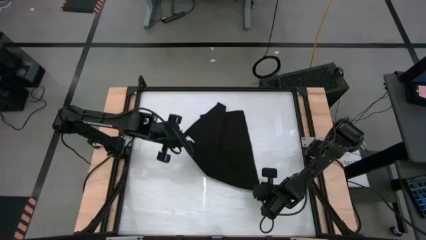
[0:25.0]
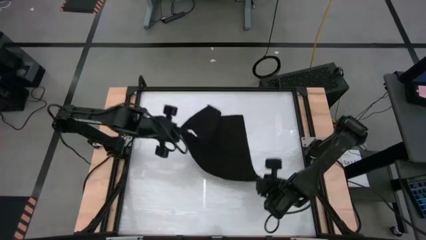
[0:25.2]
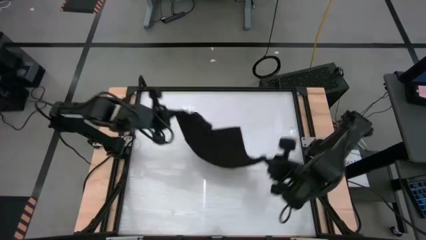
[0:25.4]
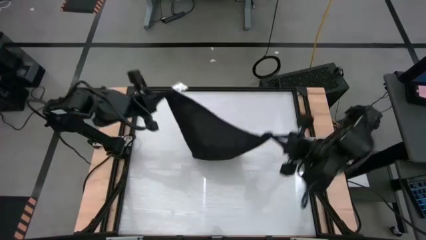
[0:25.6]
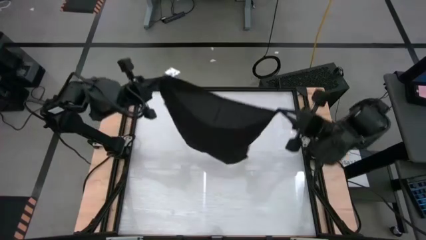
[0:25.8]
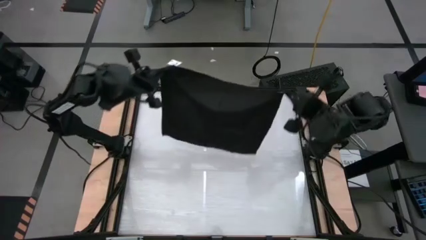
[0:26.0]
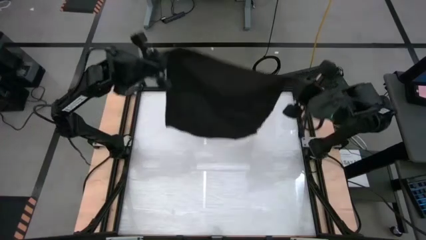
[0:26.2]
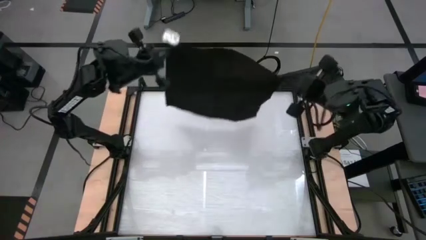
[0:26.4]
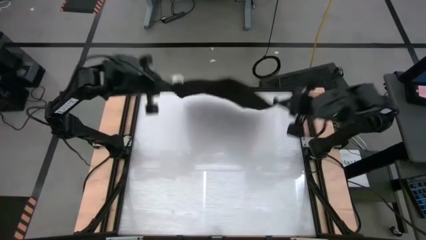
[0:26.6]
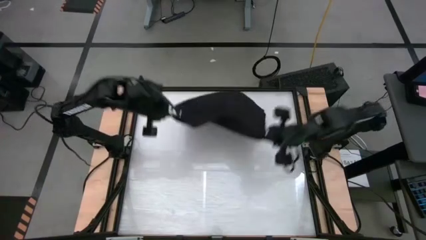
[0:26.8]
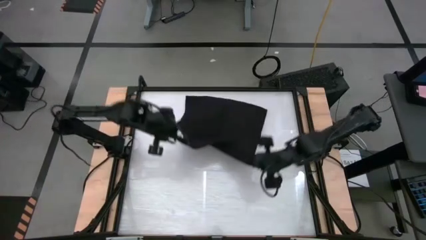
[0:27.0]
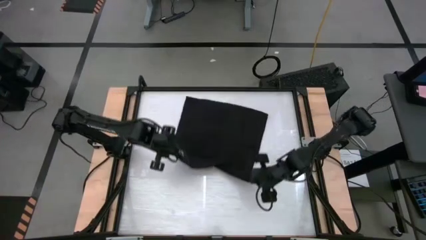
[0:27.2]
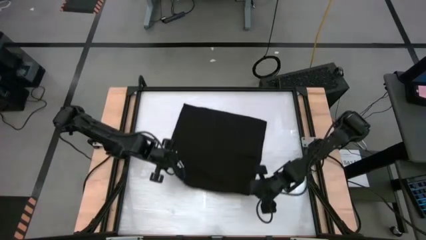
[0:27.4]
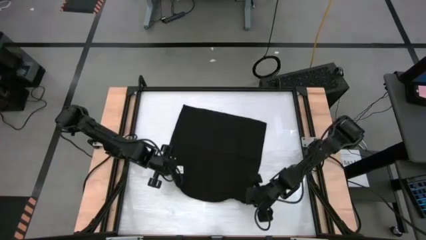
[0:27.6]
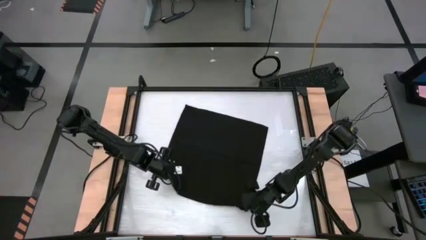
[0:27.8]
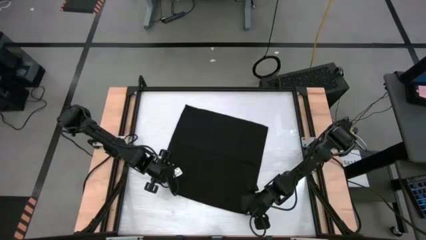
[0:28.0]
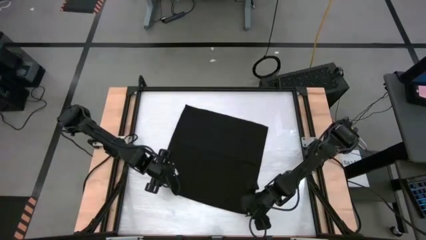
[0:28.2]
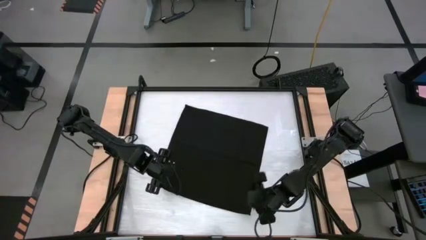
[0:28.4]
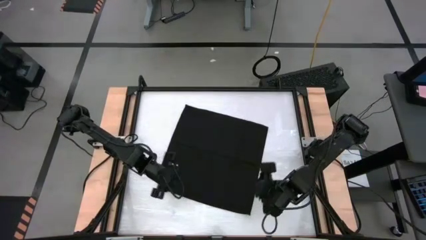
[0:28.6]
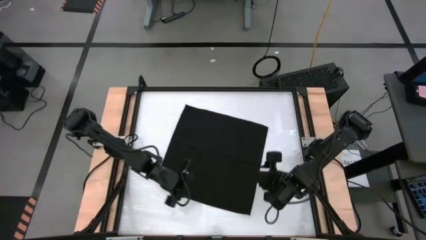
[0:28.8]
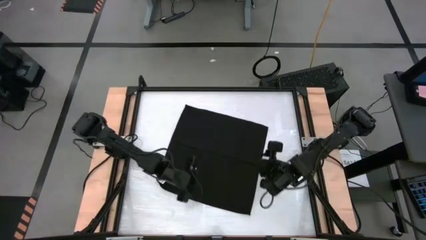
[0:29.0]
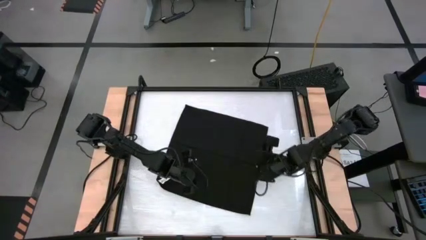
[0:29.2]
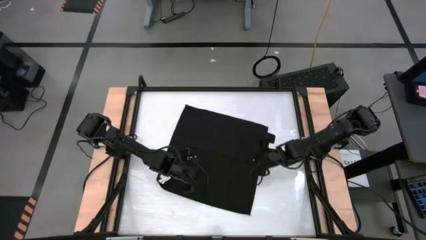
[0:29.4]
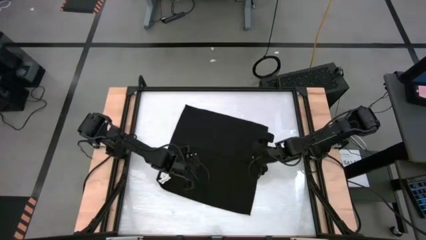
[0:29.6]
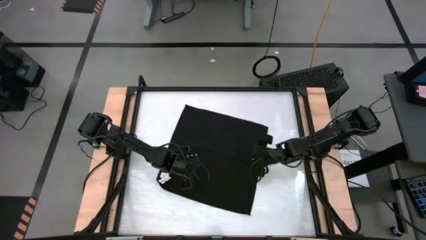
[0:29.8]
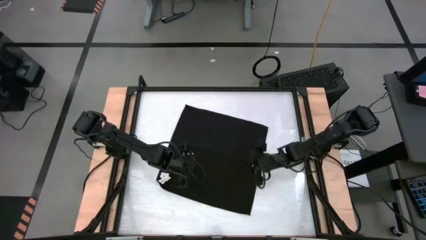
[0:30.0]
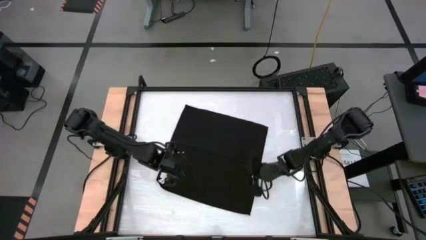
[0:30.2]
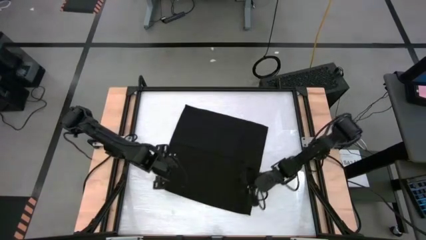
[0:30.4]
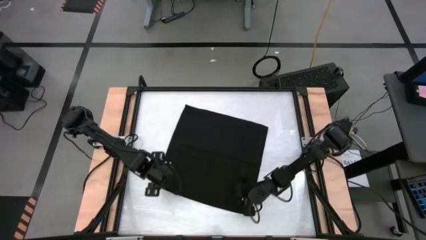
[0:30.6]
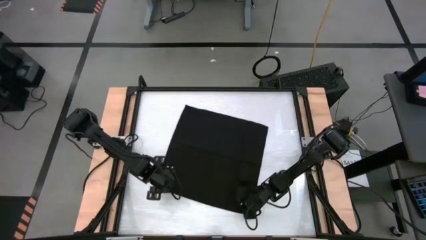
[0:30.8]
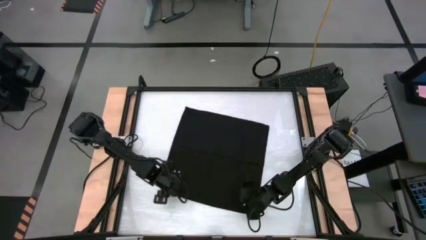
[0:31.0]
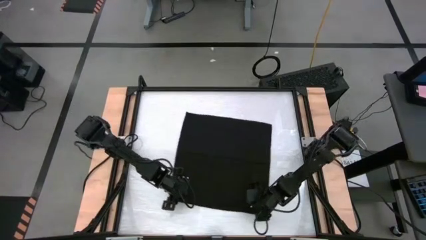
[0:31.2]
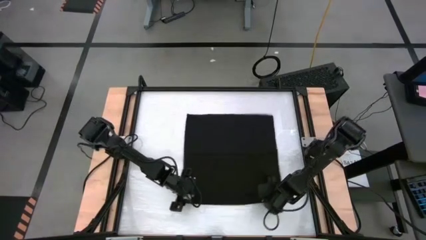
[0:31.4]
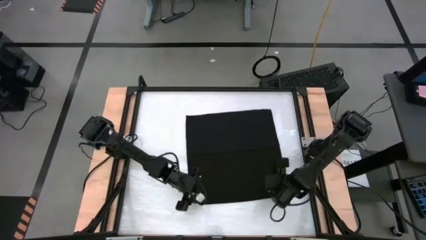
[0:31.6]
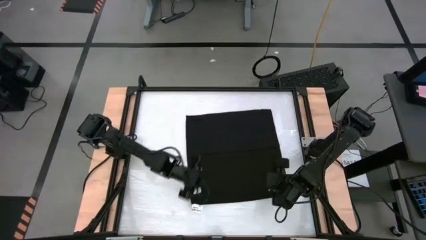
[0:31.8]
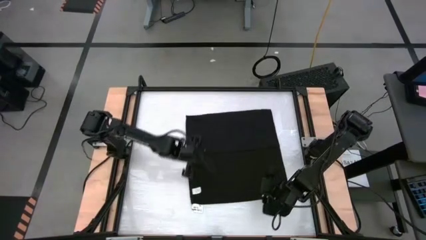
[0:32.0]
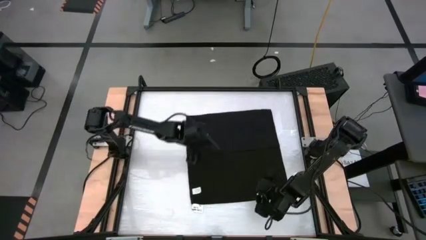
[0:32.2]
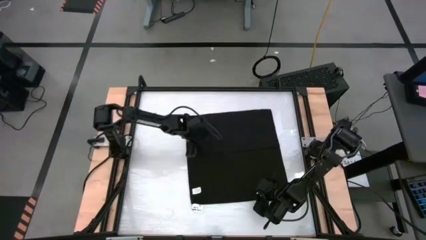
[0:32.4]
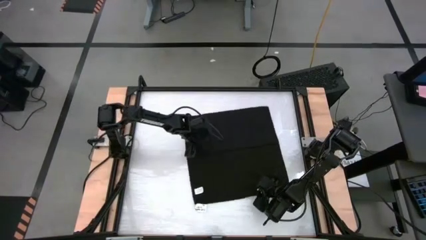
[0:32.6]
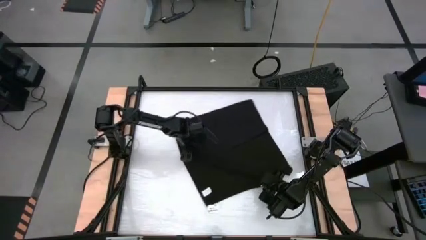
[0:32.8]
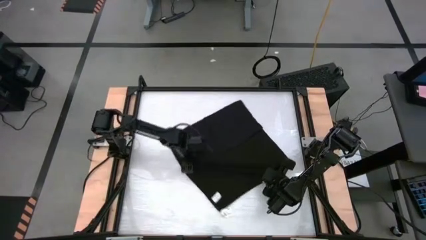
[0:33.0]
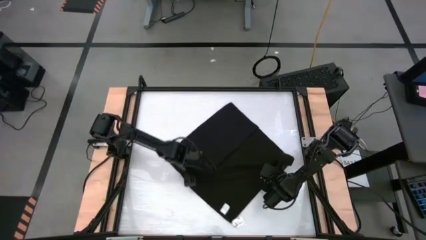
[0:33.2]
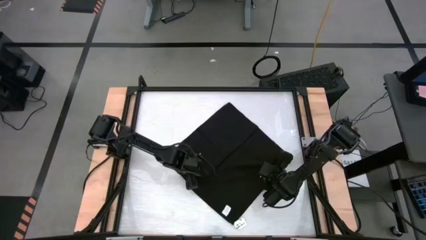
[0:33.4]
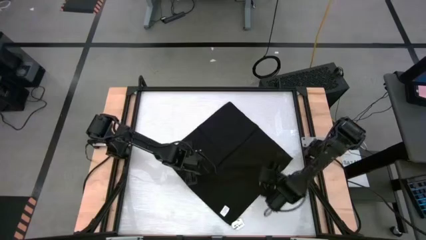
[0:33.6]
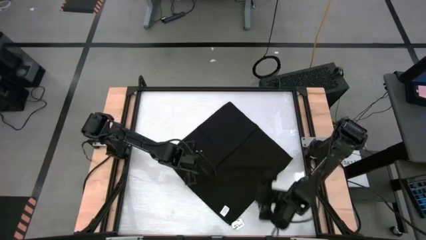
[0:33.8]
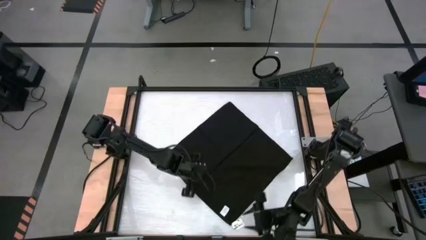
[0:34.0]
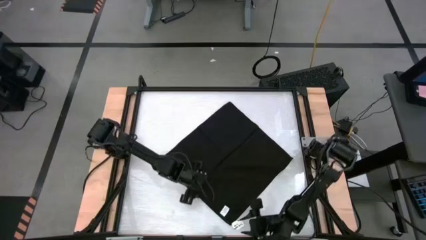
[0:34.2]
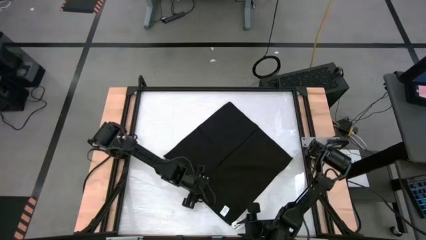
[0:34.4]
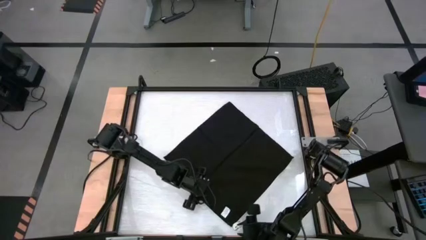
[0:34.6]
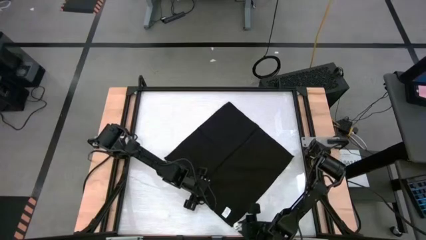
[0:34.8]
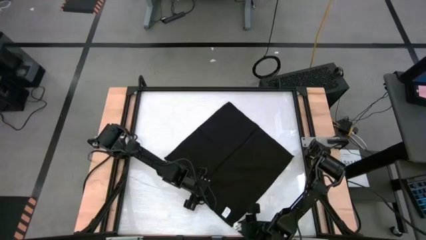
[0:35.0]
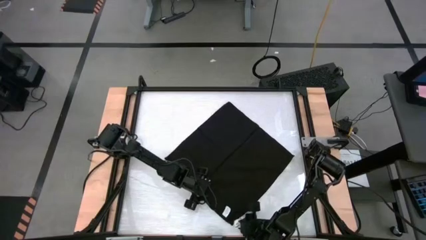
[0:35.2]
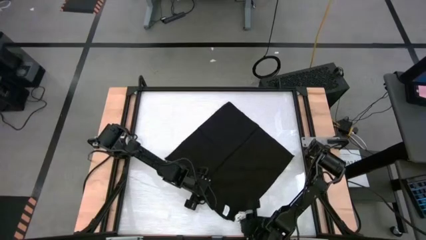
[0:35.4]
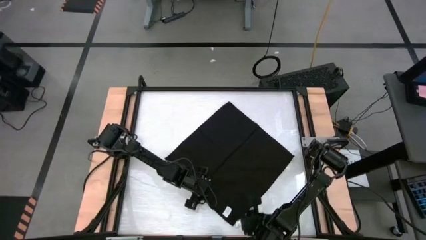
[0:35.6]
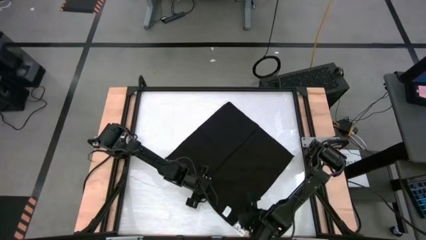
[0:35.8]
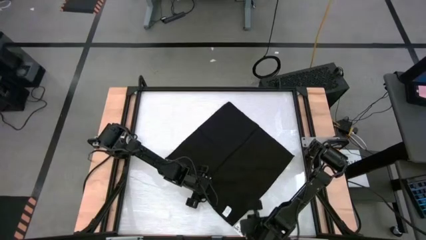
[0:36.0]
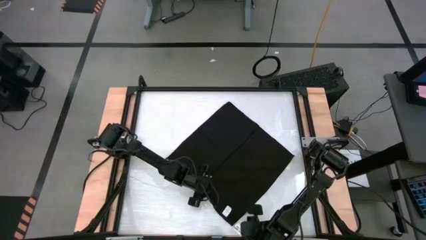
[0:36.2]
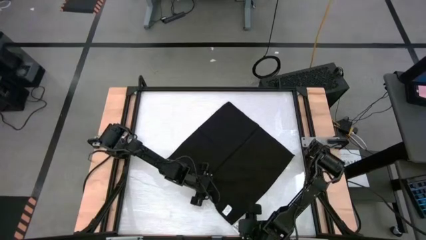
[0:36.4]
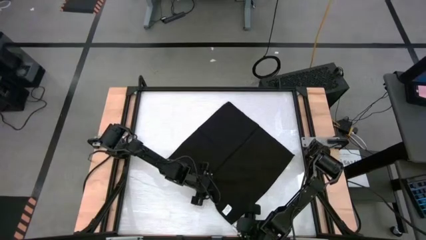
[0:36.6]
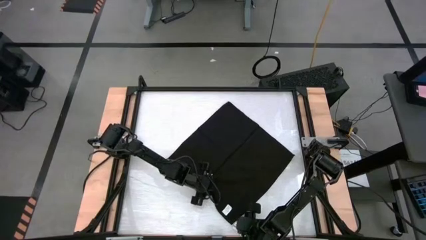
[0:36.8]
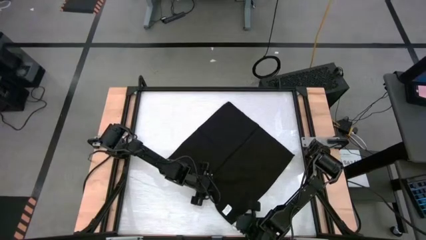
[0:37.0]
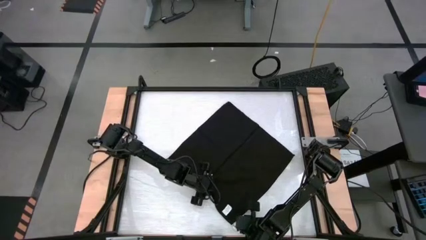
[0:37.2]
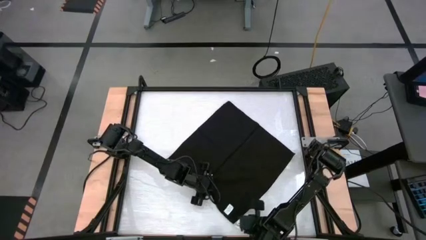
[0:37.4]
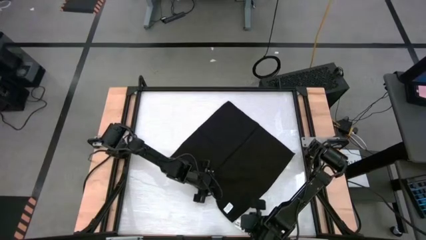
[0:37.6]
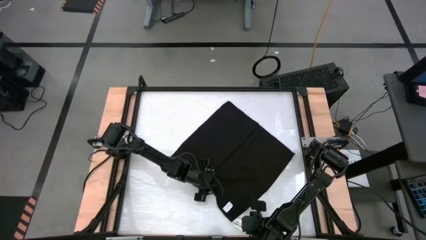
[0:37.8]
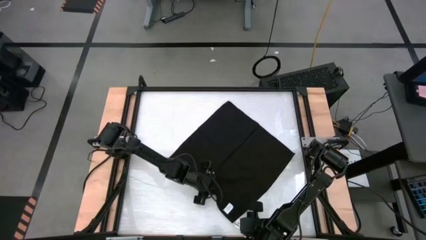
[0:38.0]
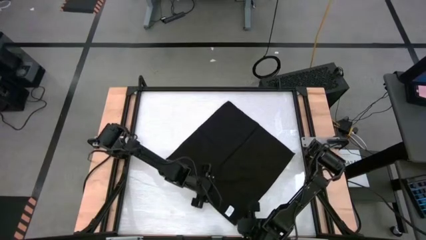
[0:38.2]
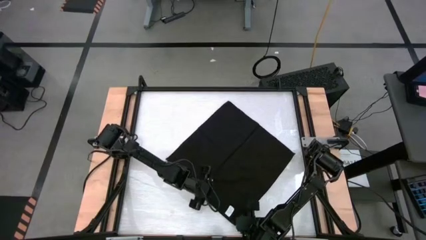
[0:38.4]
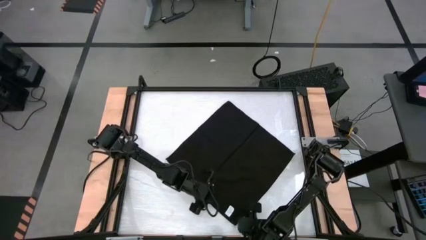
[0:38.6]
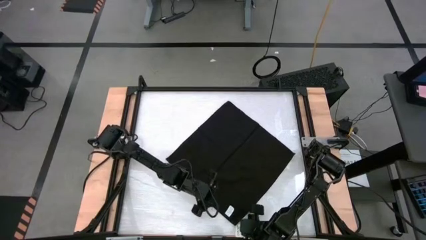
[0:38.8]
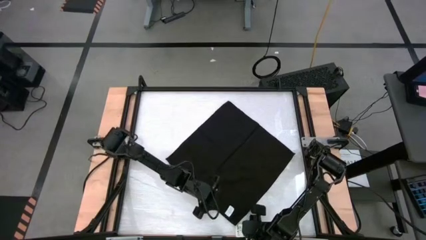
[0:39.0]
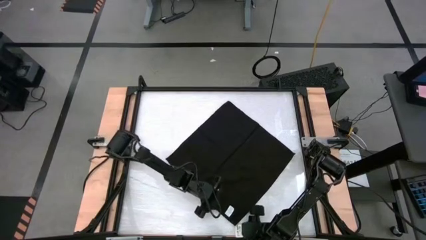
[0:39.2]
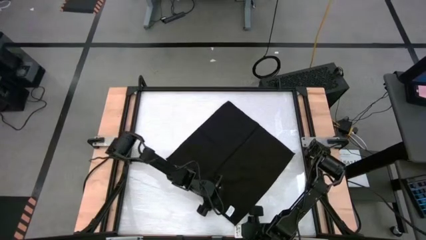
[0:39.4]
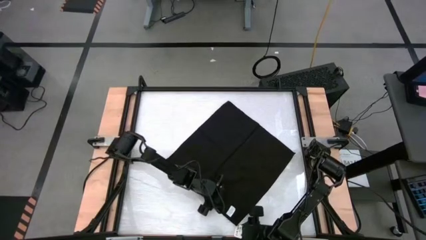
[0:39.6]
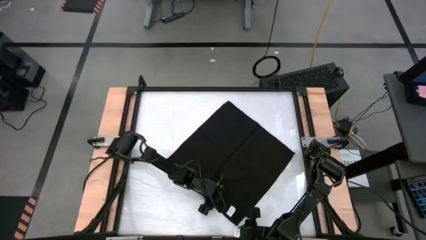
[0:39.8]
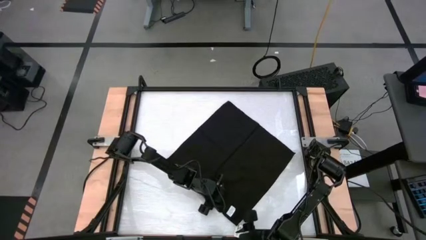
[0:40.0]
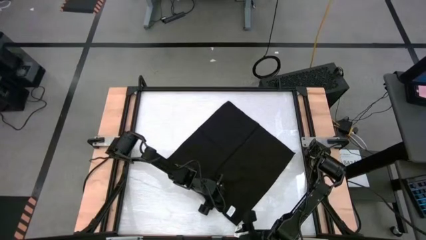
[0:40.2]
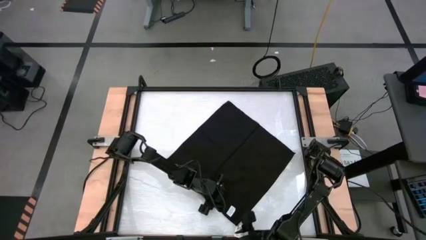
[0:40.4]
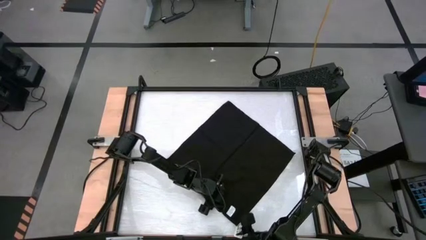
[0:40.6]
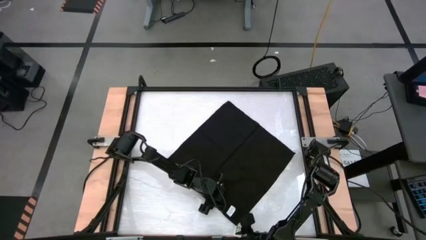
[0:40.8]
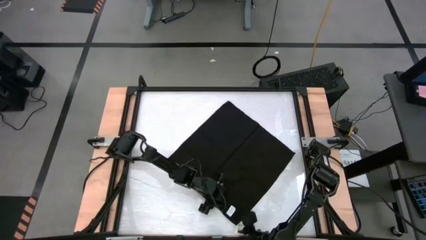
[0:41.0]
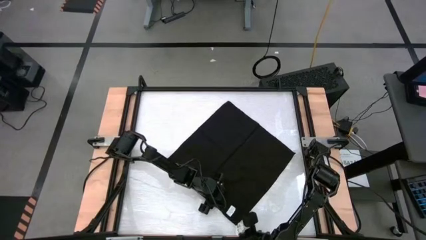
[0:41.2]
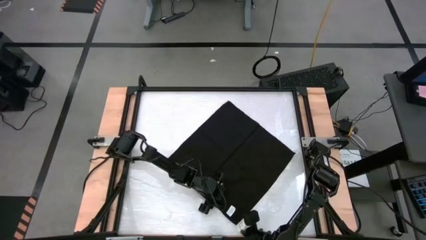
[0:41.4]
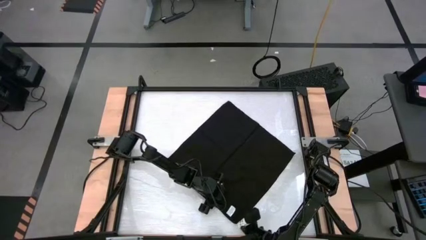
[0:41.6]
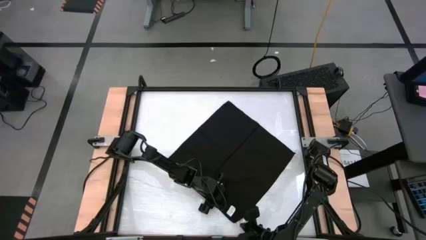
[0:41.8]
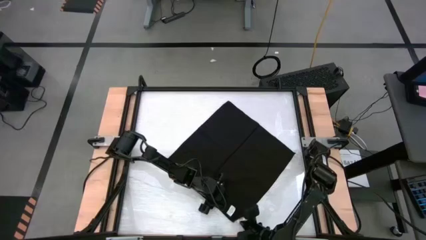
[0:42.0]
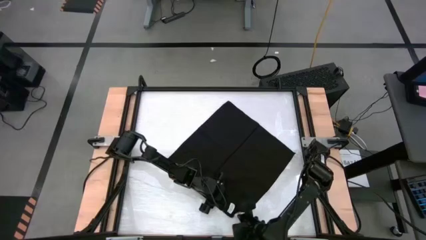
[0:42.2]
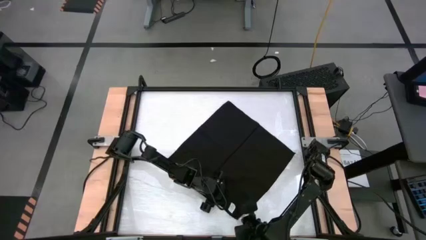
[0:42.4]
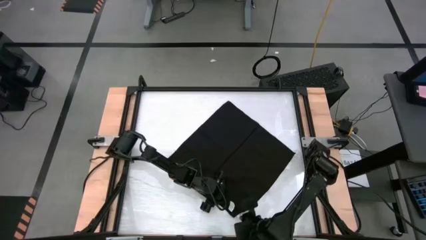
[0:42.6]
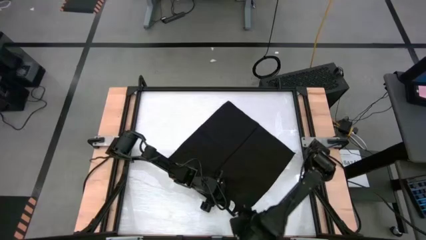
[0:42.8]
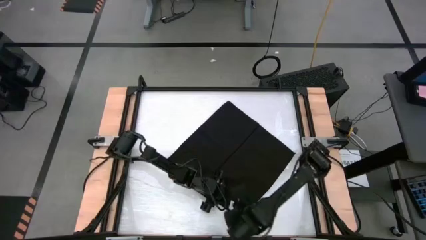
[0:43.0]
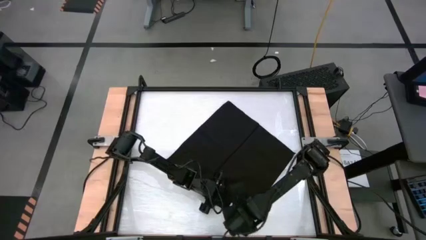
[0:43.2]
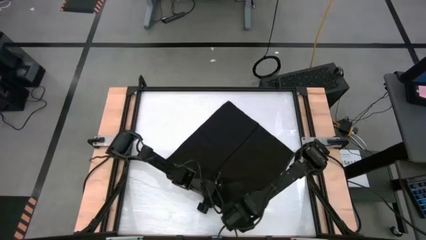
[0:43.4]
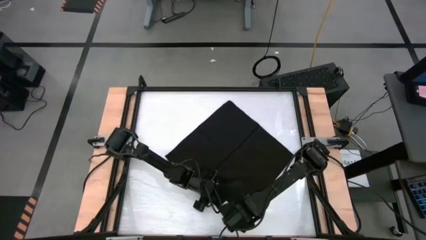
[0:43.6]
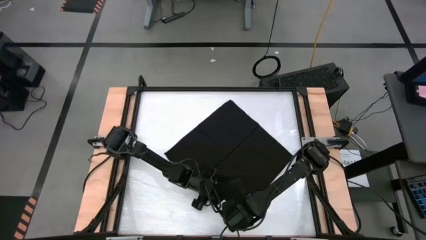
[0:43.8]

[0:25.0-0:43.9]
Task: Roll napkin
Roll the black napkin
